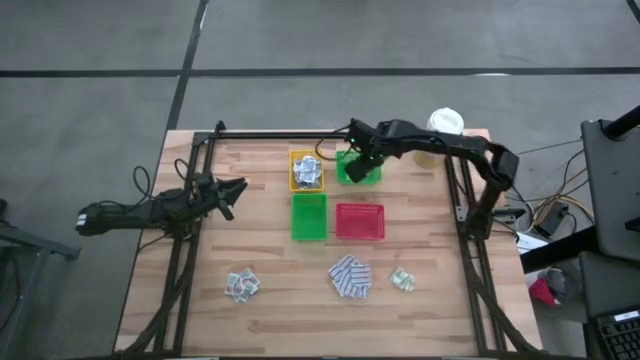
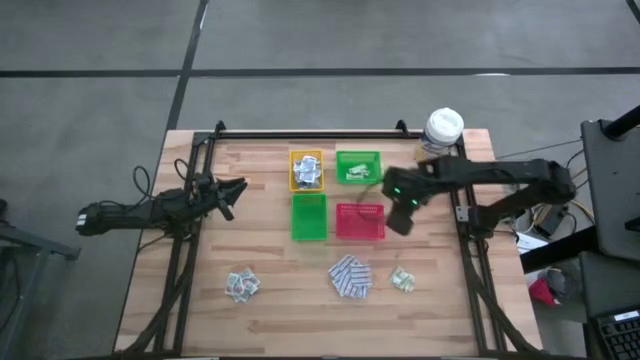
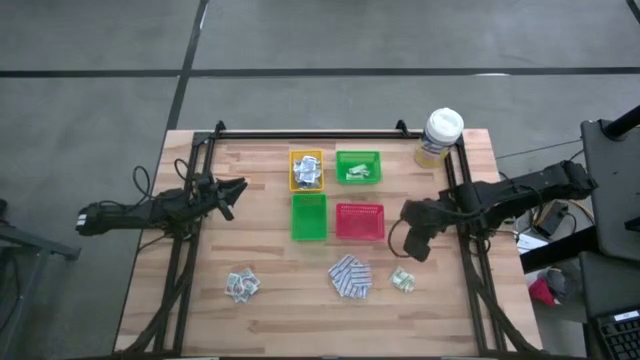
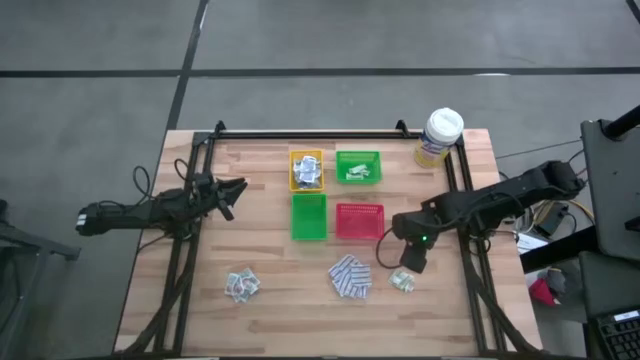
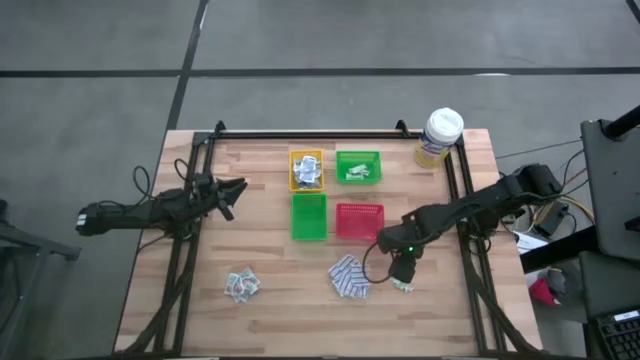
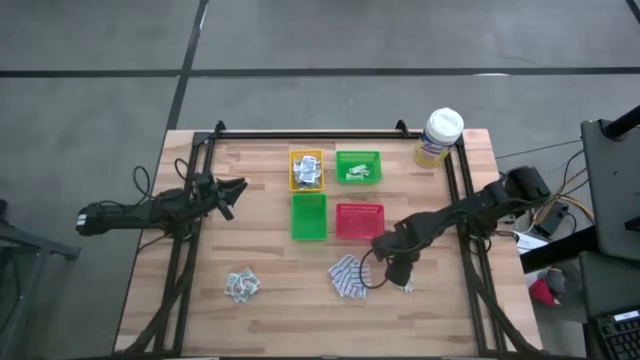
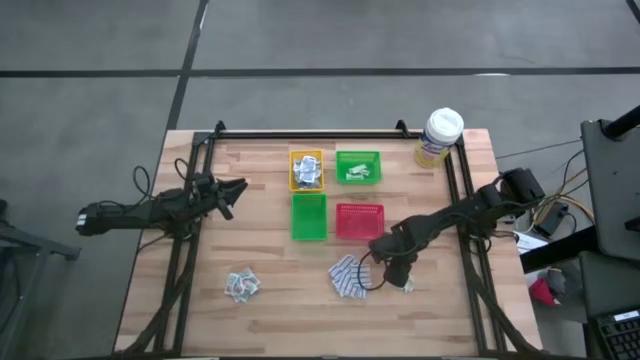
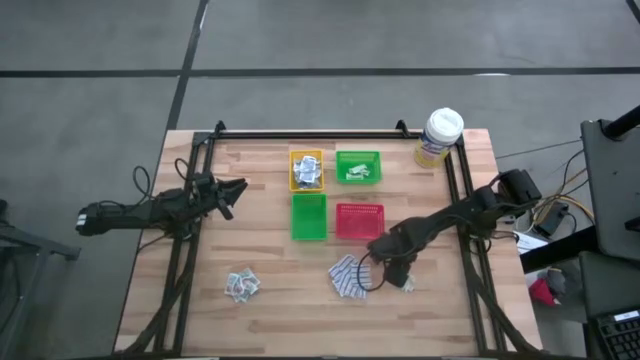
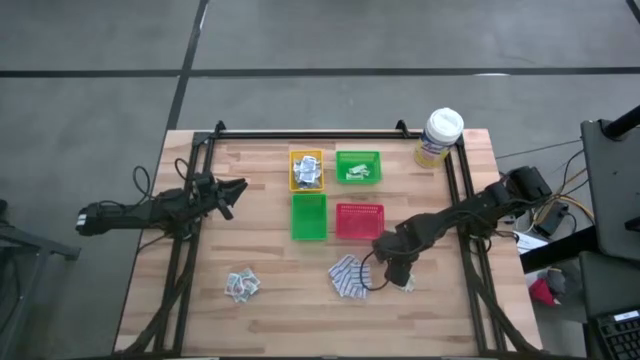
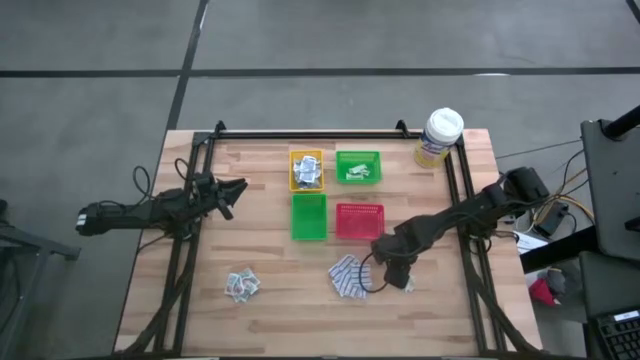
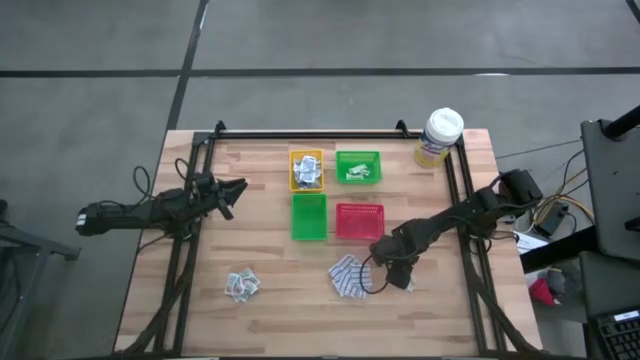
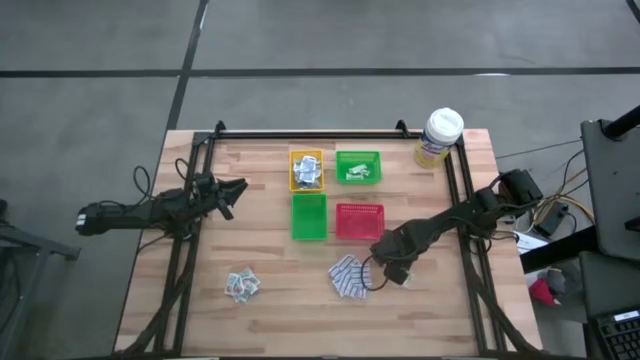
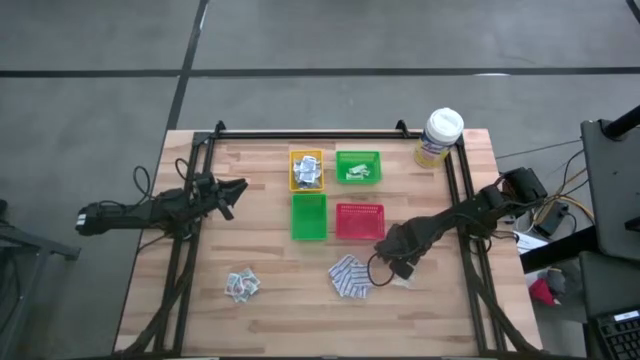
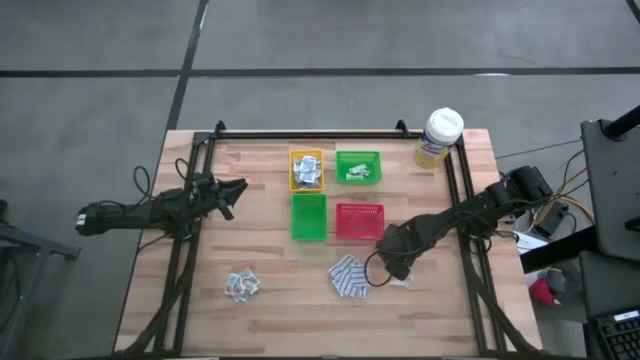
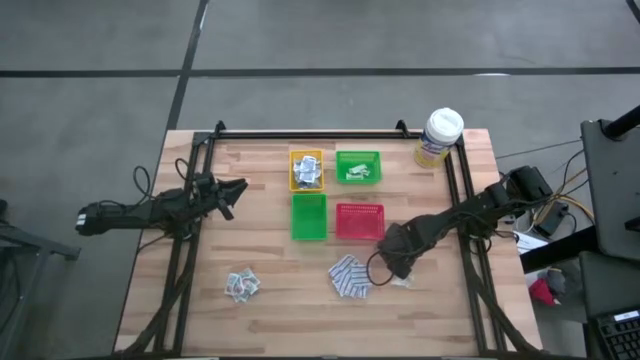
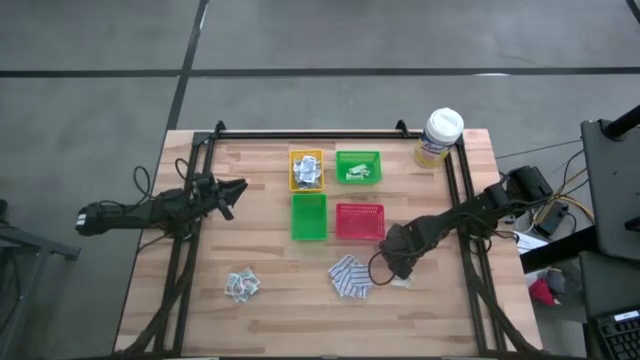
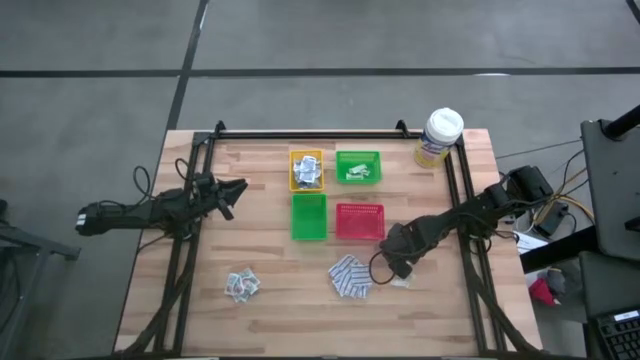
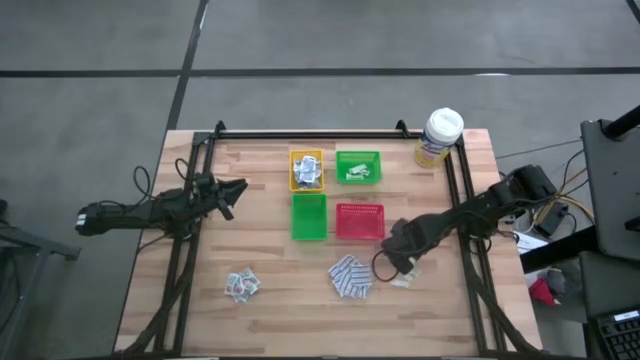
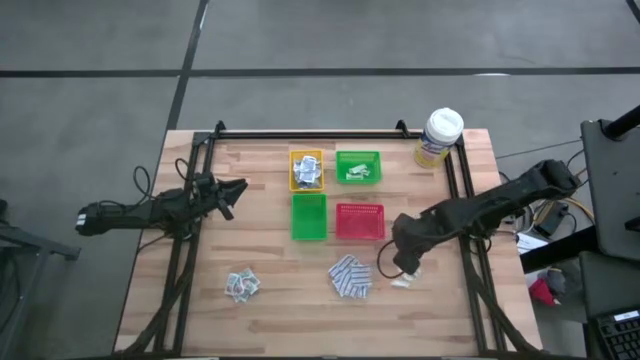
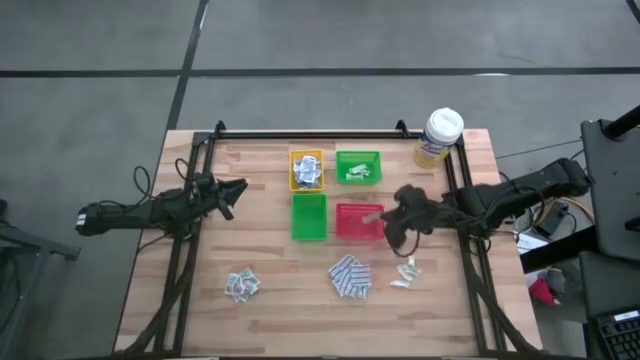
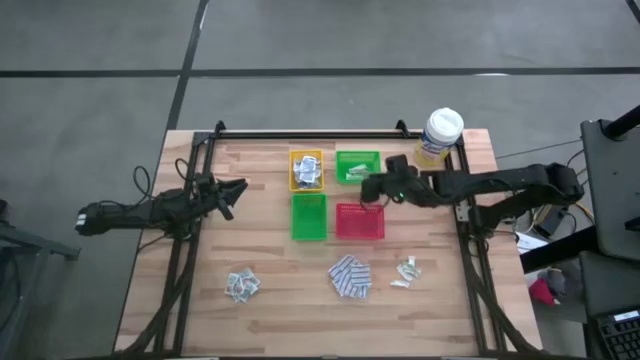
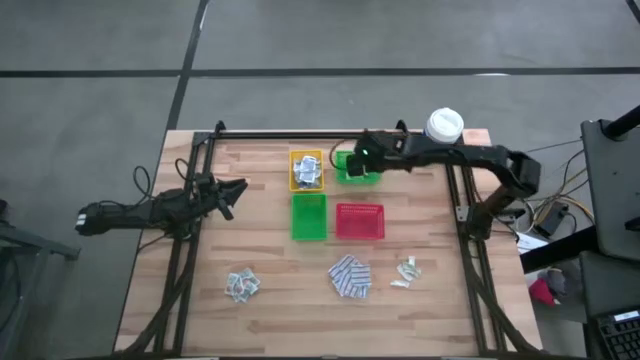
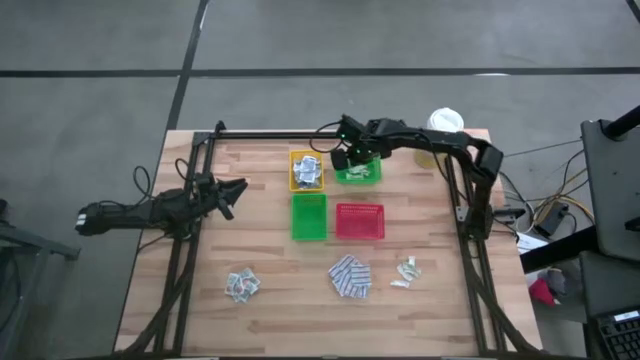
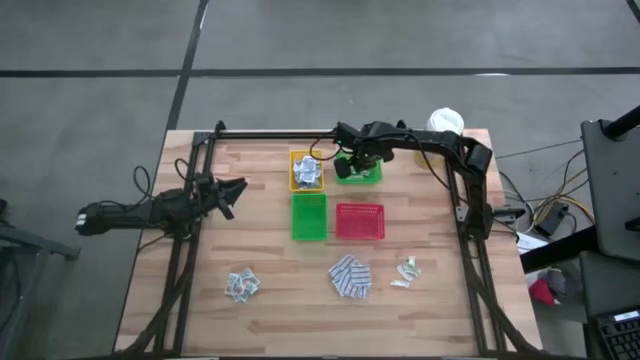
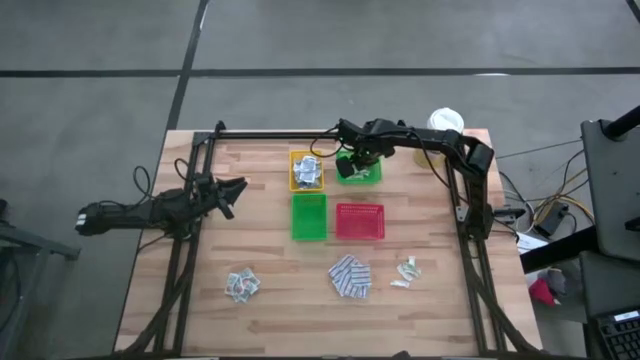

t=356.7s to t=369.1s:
Task: Pick & Place First Aid Supplies
Put the green bandage pack into the top green bin

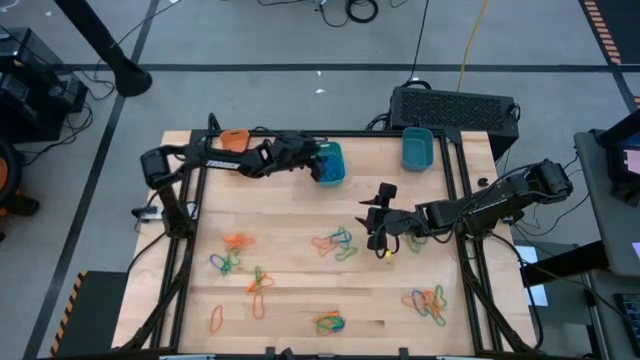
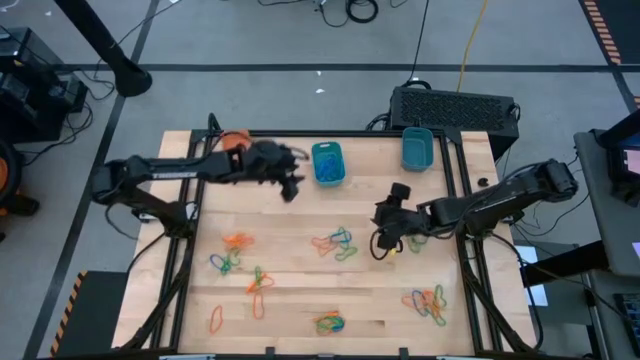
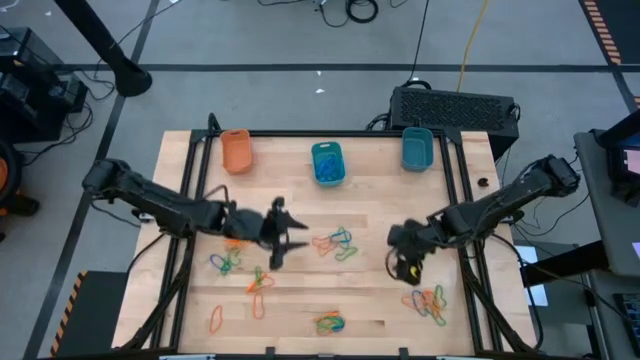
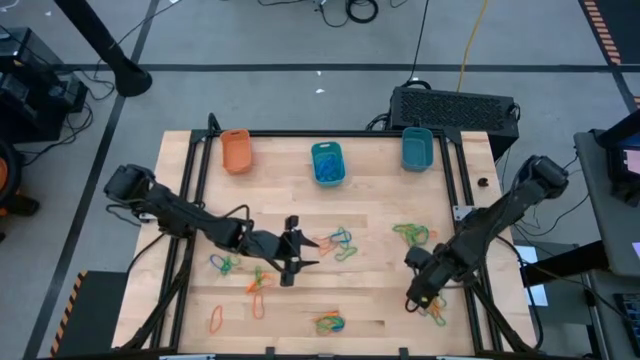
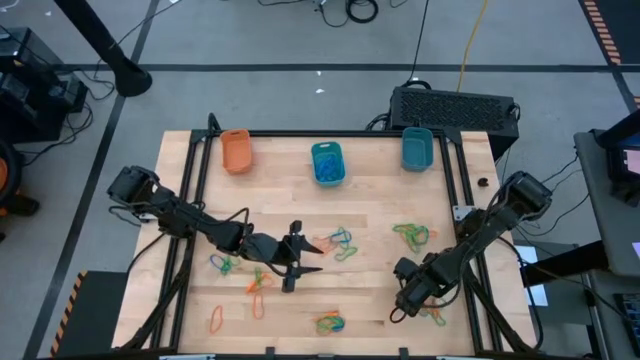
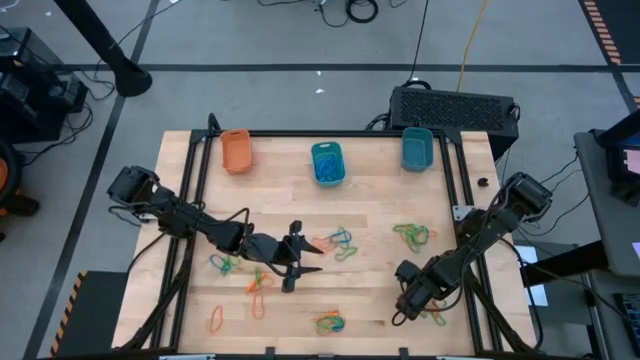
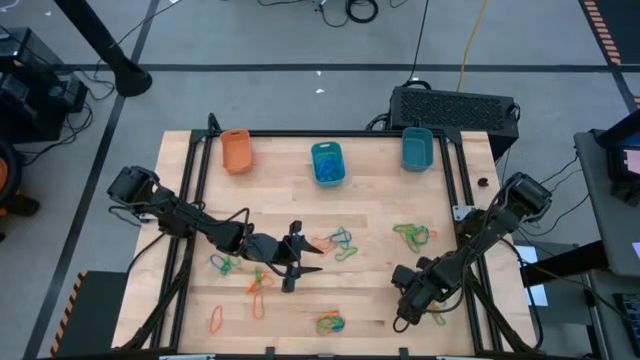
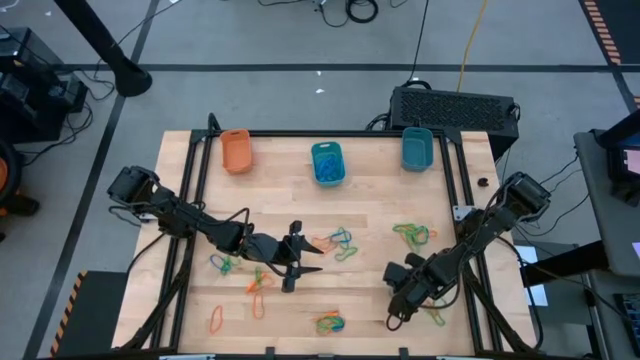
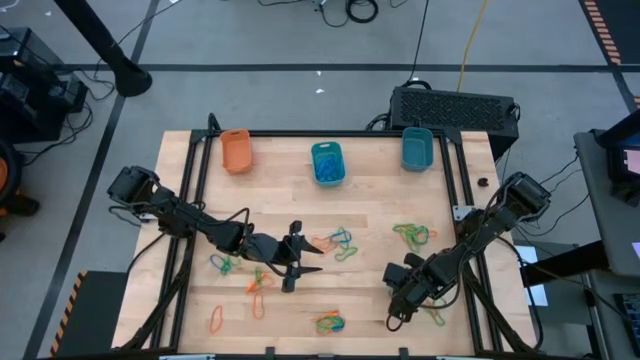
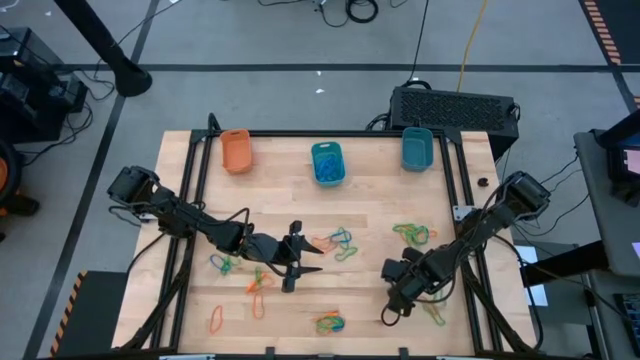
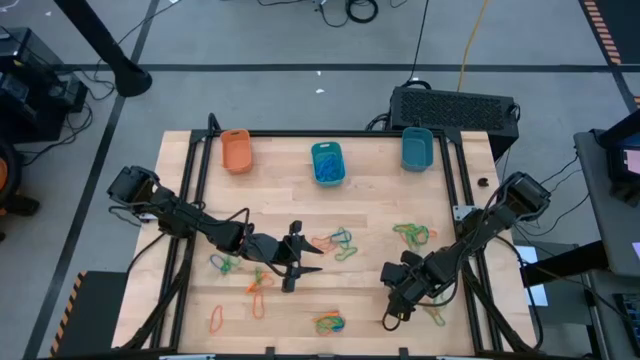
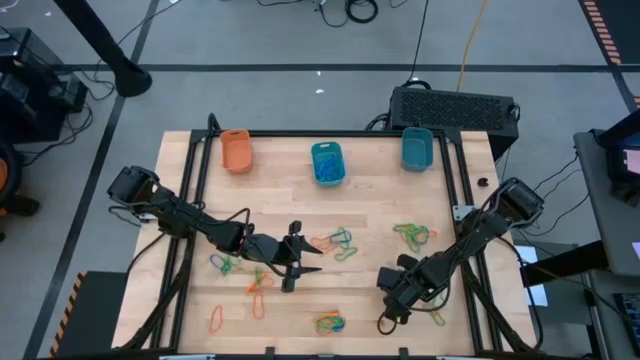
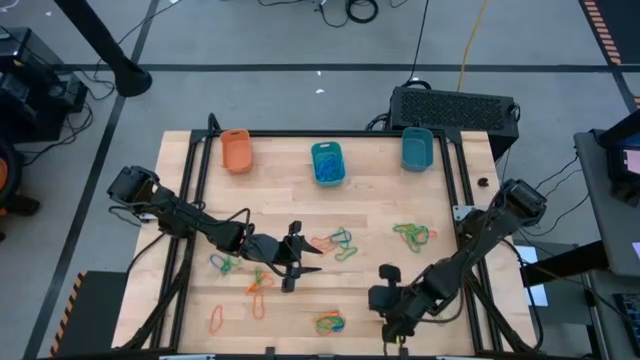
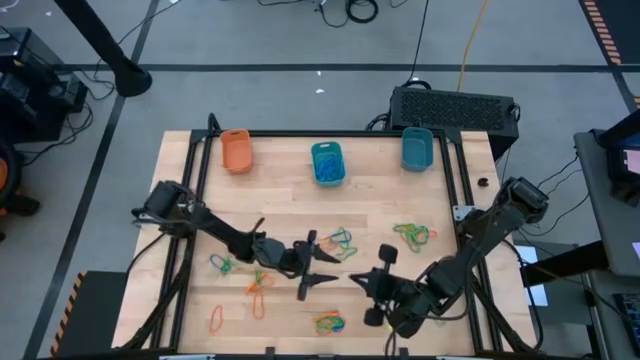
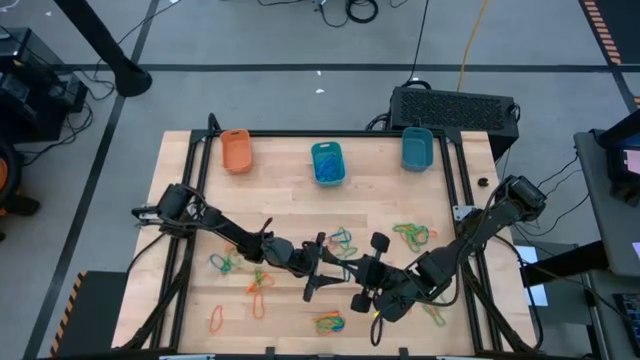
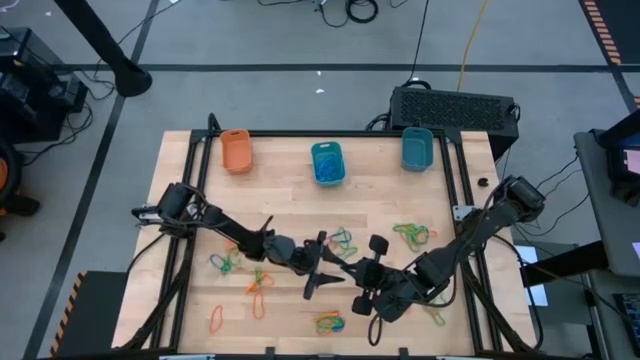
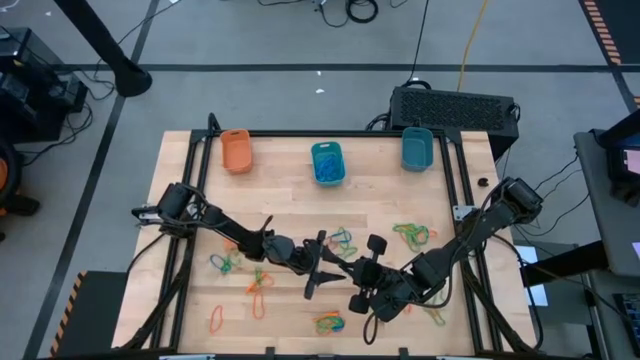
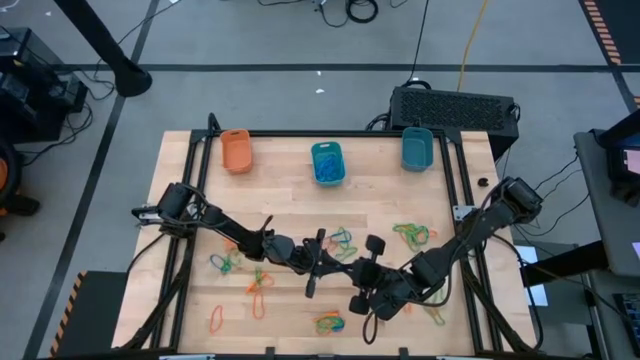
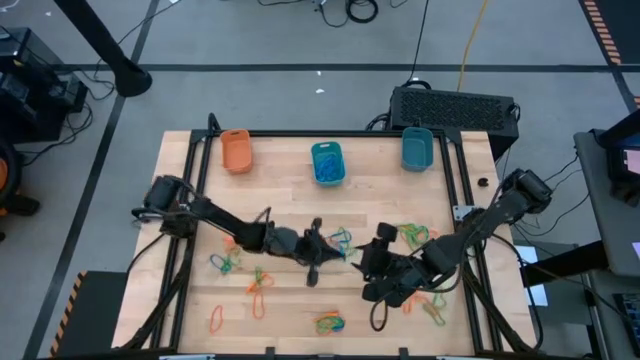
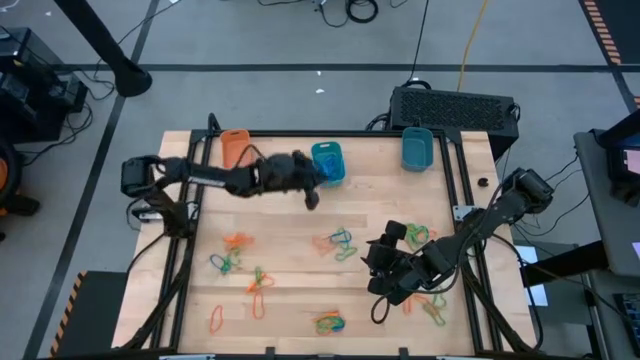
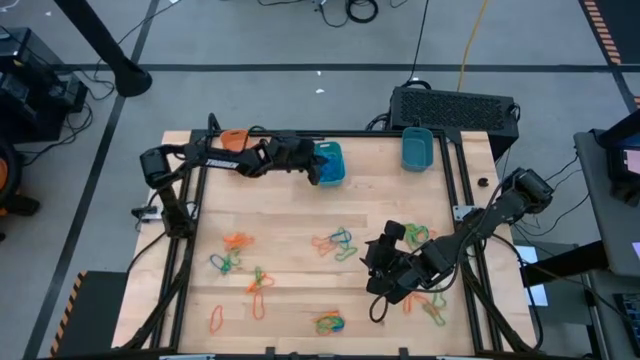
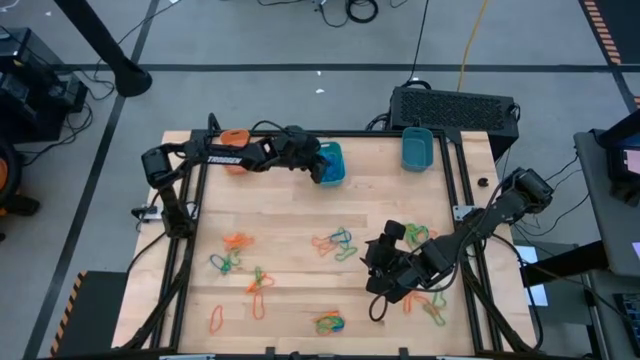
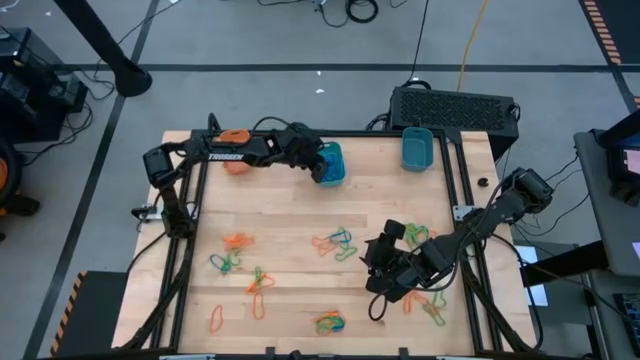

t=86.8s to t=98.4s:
Task: Sort rubber bands into baskets
Put the blue rubber band into the light blue bin
